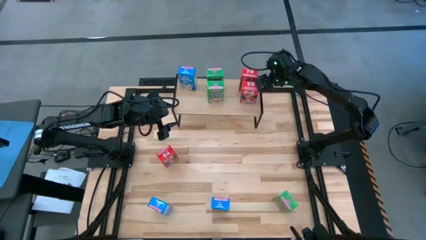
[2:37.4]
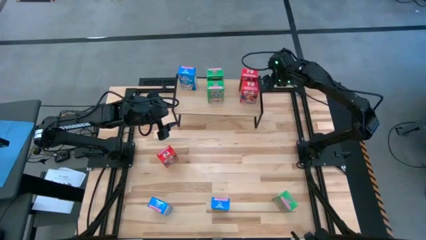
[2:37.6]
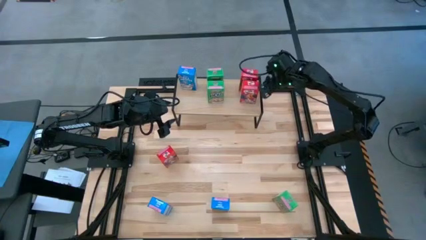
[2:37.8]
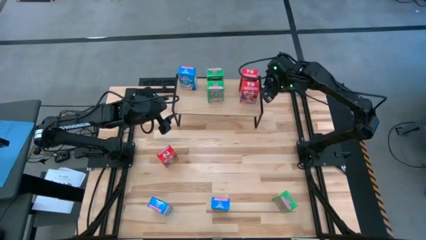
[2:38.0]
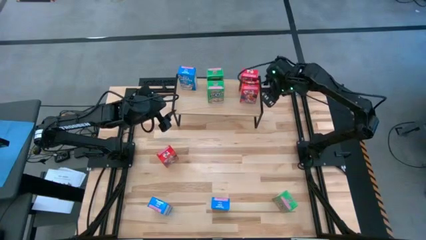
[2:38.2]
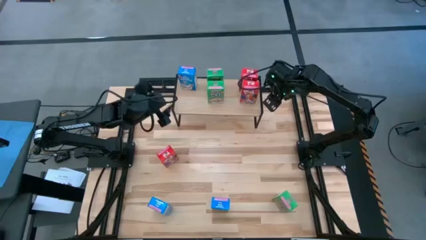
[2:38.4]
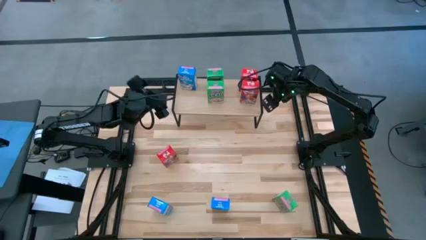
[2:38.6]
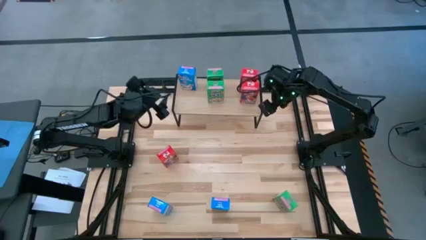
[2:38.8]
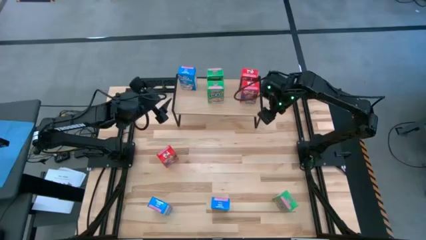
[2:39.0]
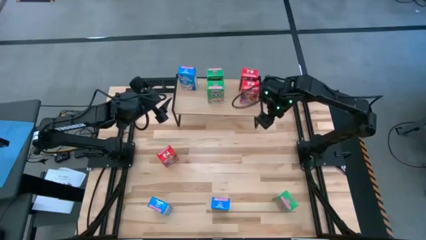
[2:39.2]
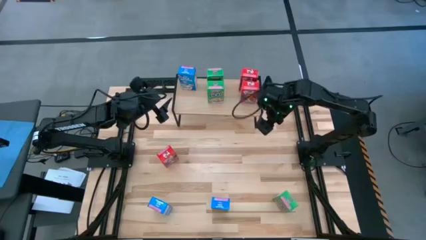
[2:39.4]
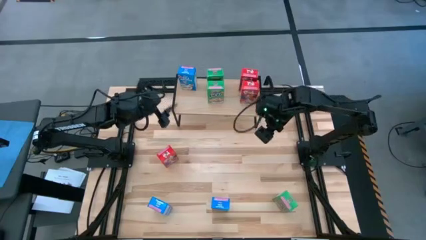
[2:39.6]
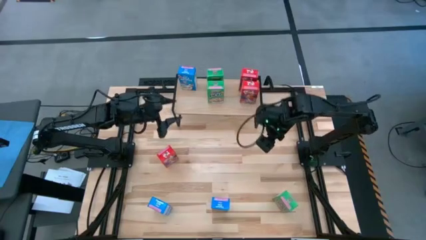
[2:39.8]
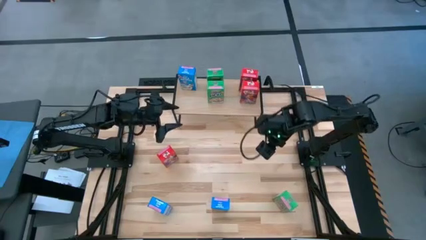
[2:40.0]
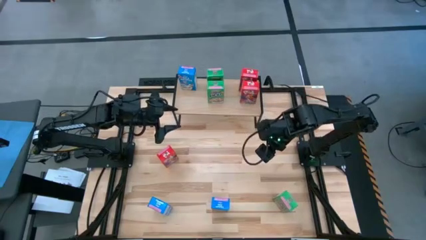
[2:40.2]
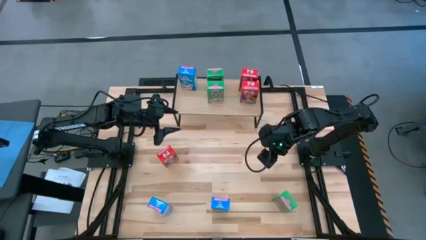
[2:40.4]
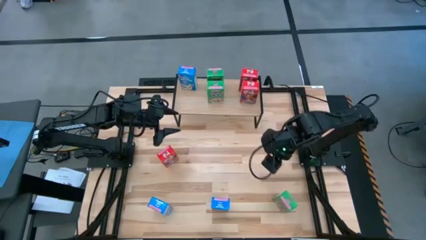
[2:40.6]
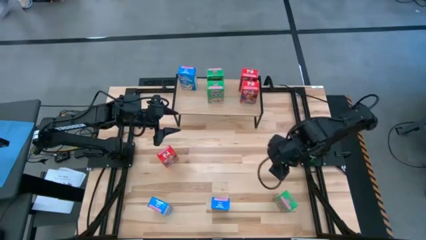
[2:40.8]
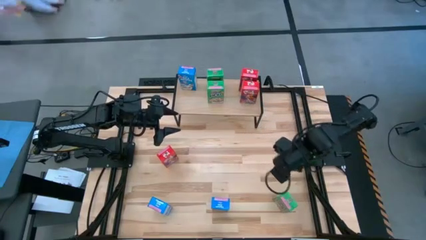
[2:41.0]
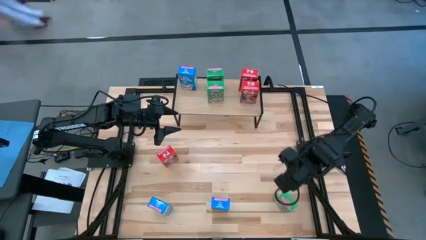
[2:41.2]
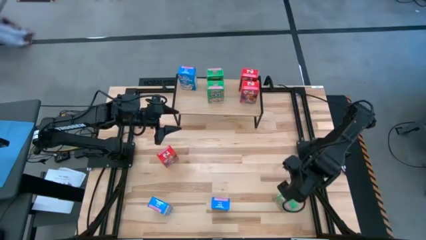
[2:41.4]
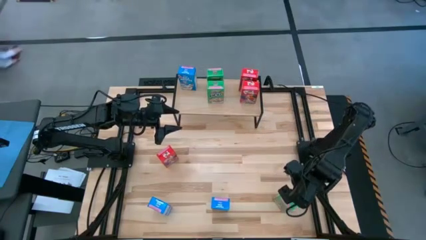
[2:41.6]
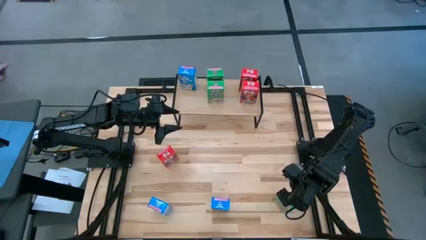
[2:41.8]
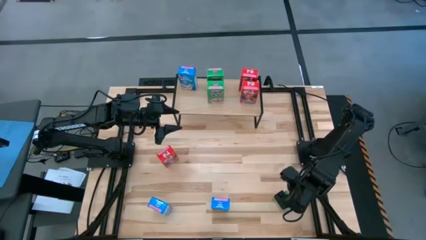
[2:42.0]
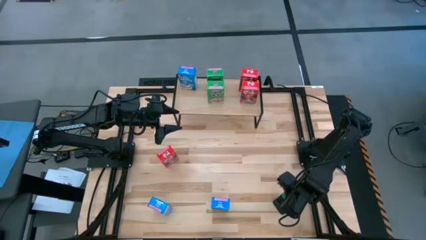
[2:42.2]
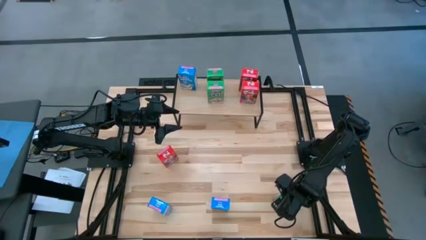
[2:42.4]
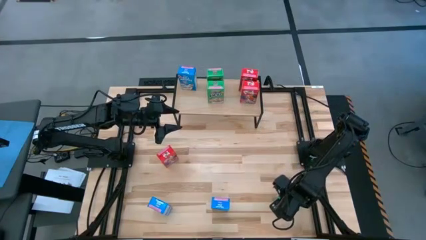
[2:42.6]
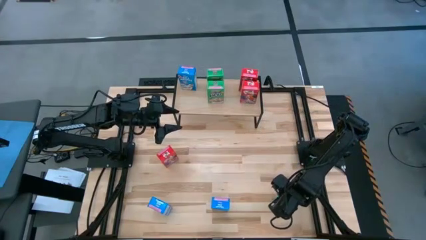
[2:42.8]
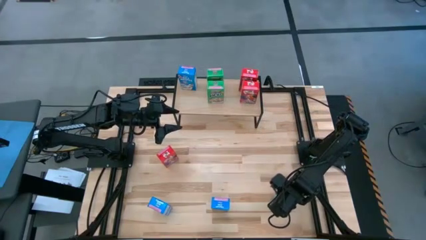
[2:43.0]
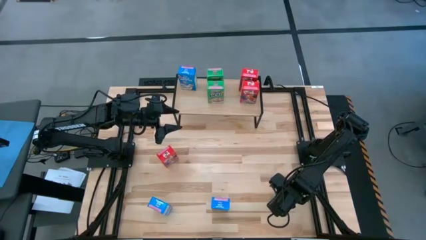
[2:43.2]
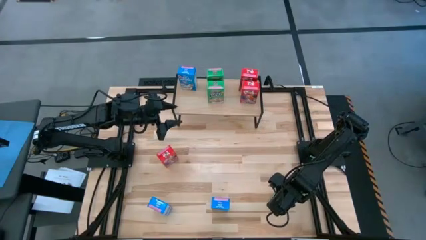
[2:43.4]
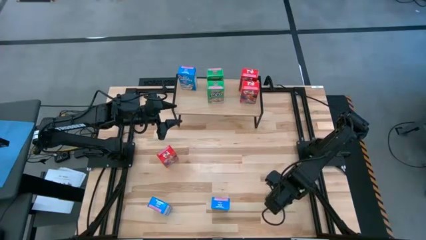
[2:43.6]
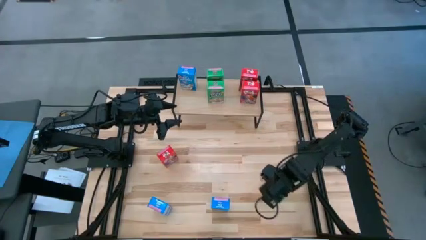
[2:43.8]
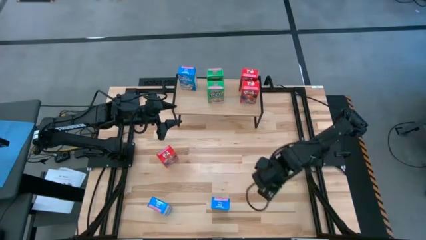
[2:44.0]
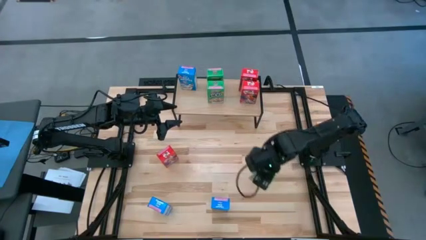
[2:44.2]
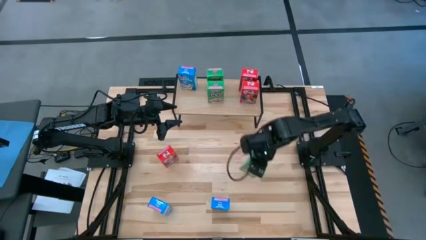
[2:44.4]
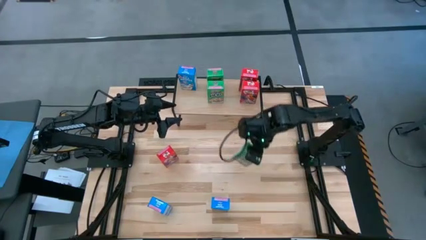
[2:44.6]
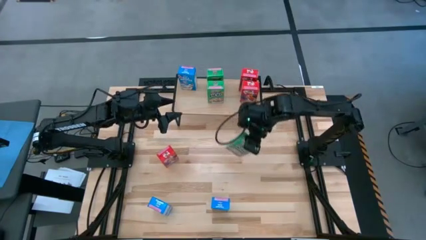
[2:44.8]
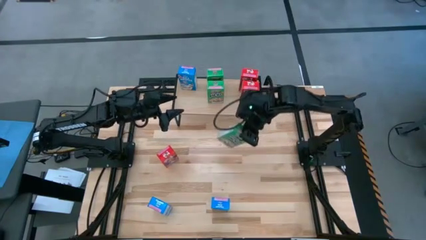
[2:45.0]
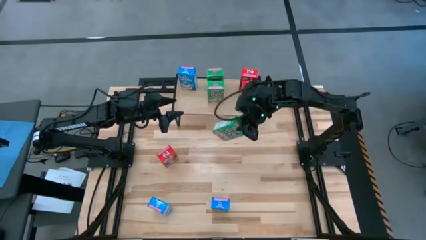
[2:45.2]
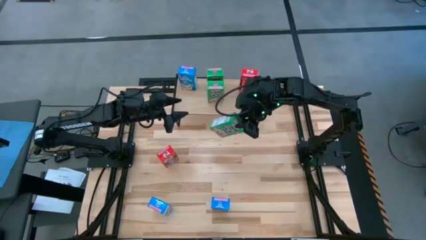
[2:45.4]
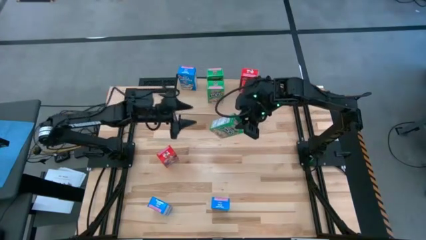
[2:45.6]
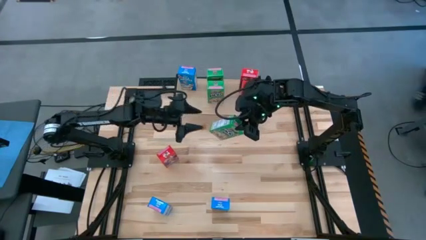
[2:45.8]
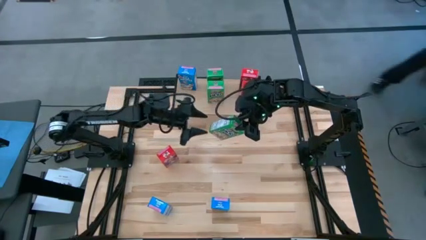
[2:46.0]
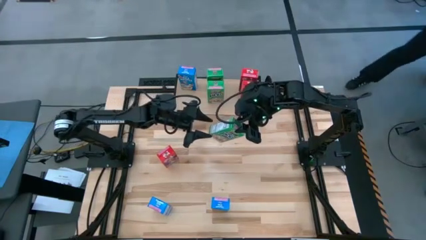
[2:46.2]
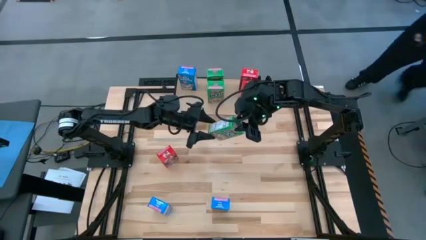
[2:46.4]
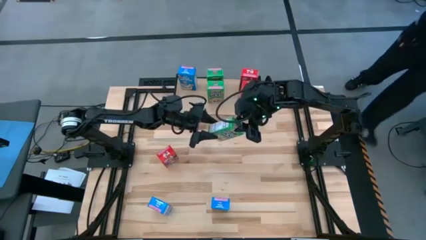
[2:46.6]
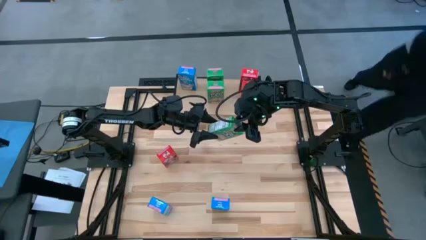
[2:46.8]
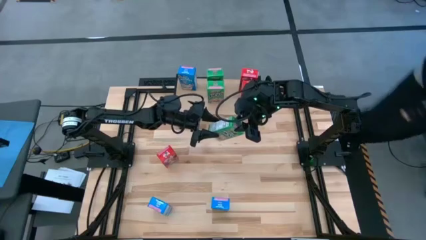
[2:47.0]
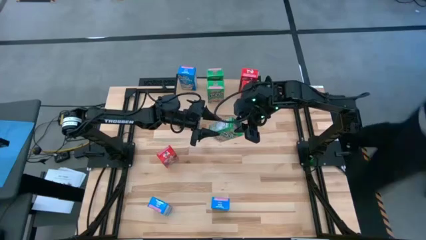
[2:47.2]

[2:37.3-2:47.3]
Task: Stack cereal on shelf
Put the green cereal box on the shelf aligned with the green cereal boxes

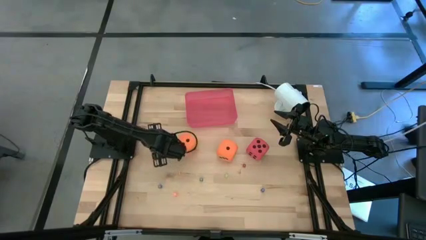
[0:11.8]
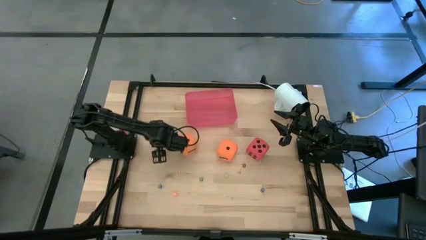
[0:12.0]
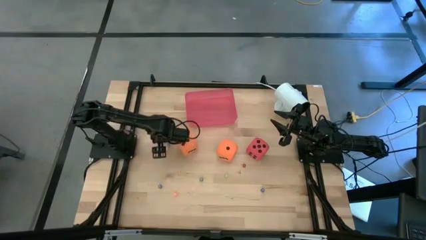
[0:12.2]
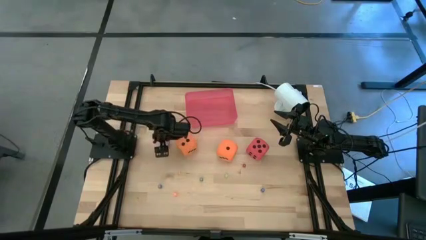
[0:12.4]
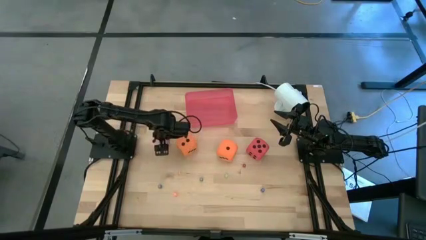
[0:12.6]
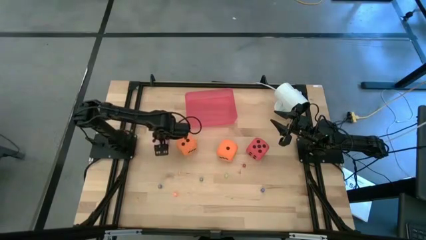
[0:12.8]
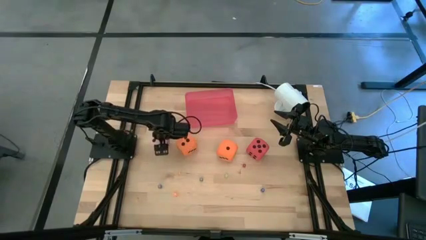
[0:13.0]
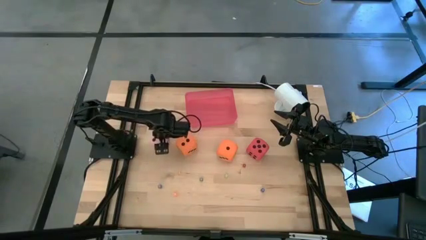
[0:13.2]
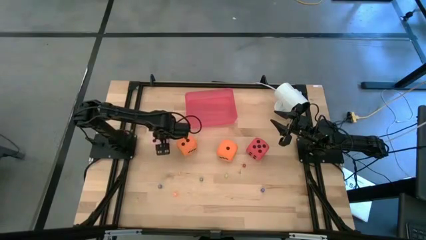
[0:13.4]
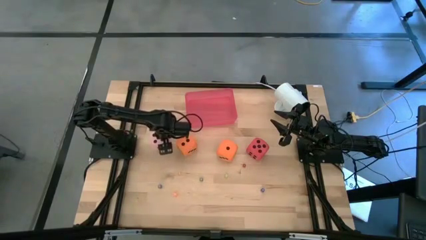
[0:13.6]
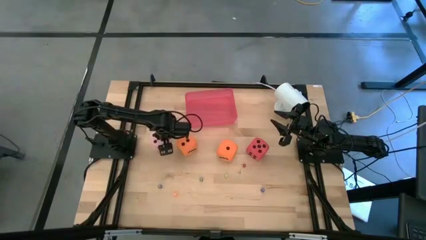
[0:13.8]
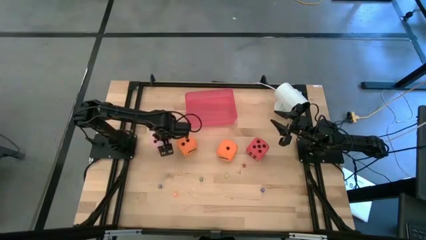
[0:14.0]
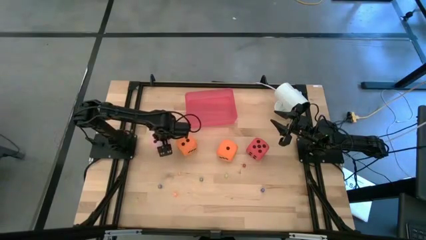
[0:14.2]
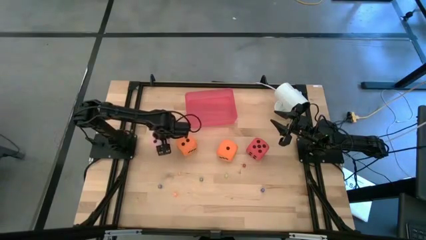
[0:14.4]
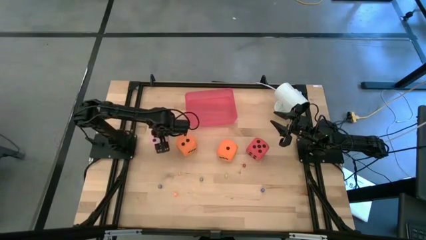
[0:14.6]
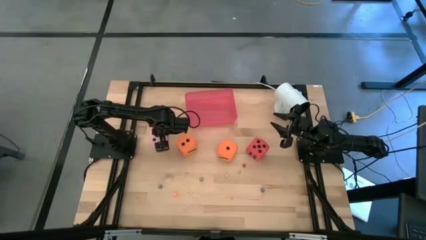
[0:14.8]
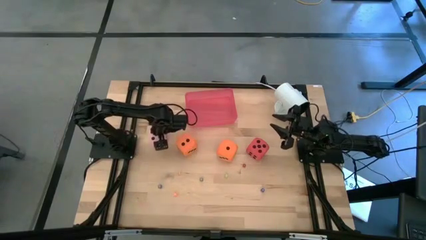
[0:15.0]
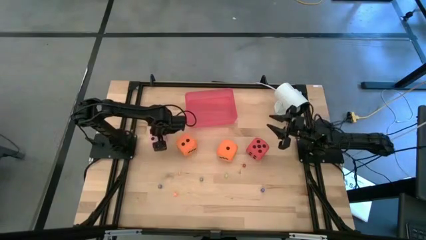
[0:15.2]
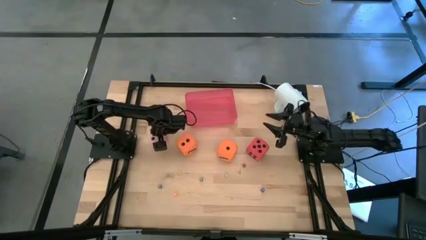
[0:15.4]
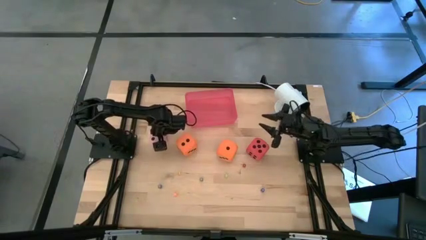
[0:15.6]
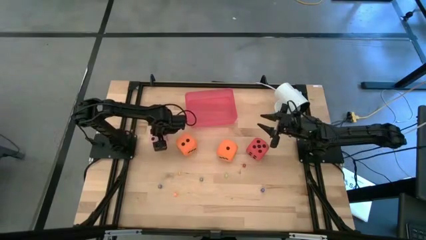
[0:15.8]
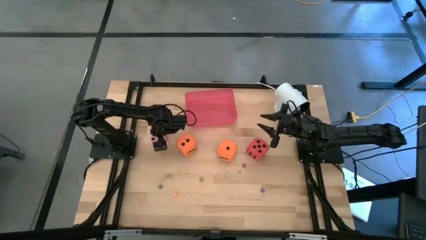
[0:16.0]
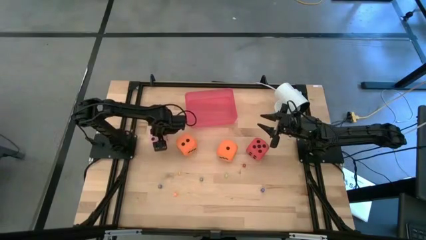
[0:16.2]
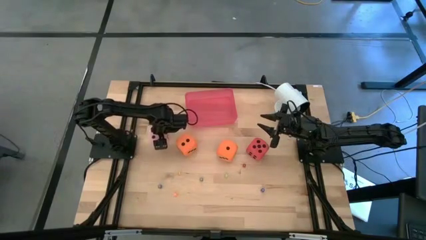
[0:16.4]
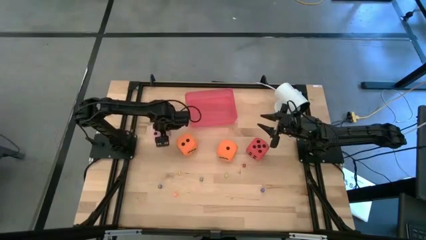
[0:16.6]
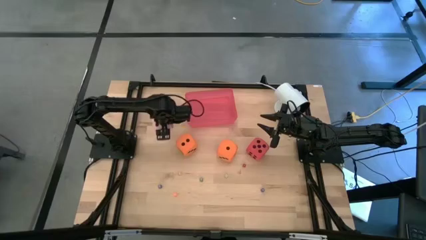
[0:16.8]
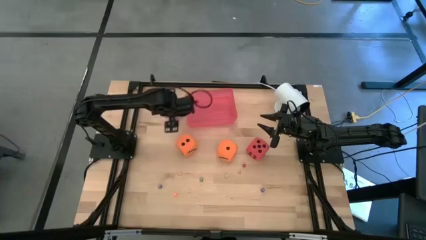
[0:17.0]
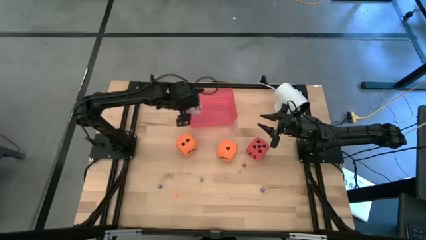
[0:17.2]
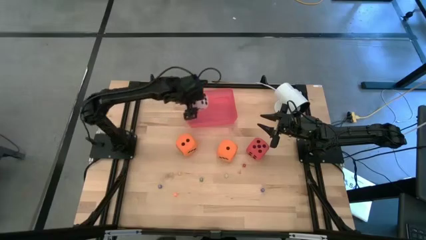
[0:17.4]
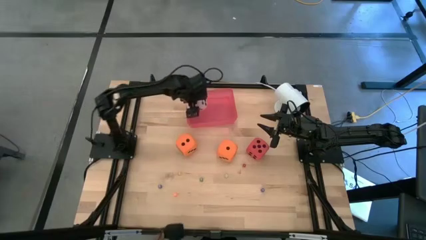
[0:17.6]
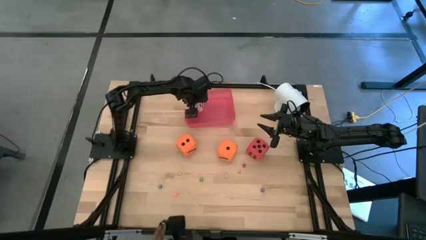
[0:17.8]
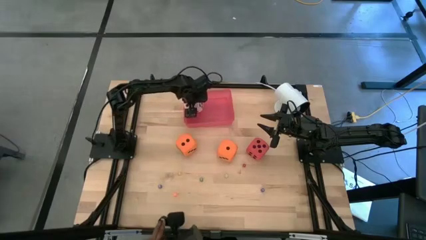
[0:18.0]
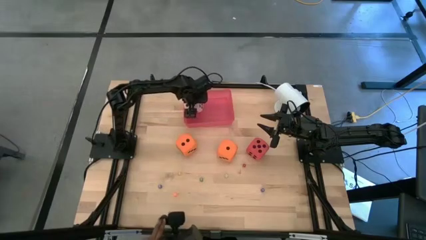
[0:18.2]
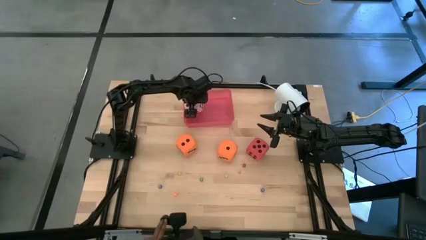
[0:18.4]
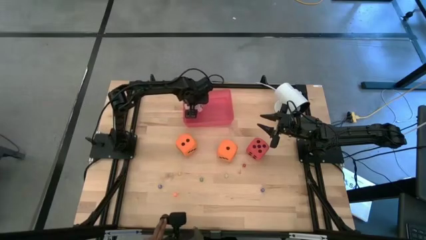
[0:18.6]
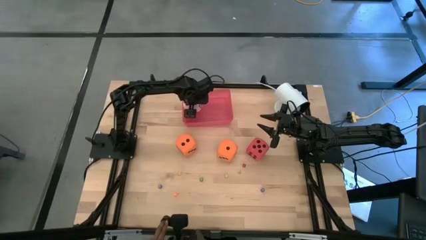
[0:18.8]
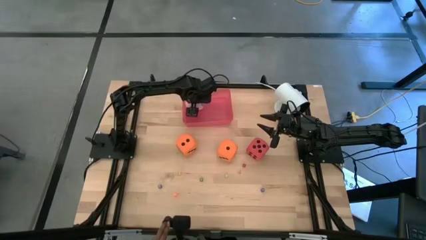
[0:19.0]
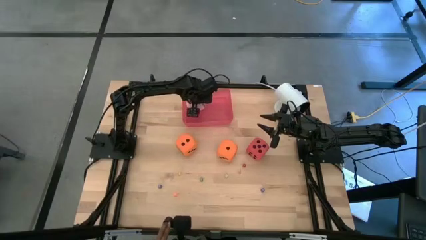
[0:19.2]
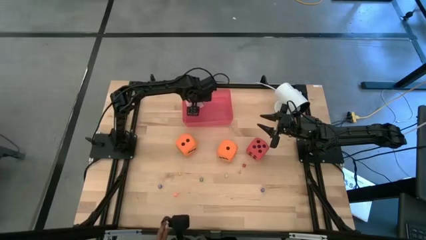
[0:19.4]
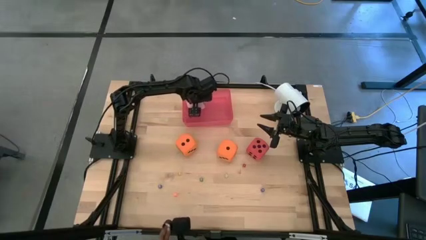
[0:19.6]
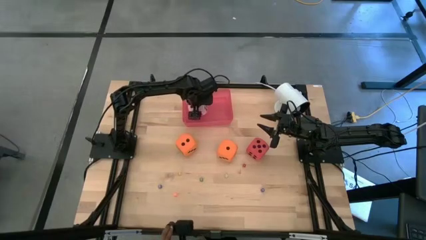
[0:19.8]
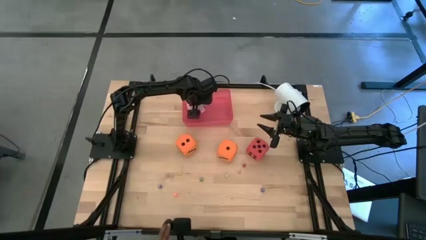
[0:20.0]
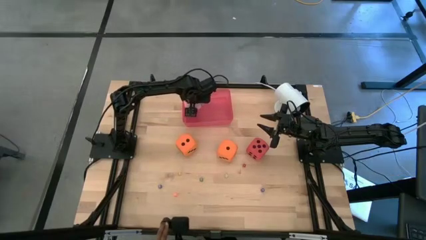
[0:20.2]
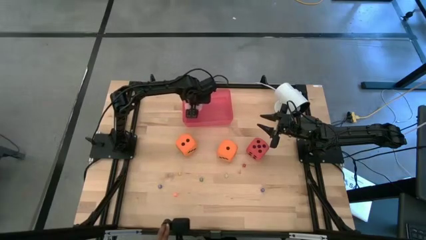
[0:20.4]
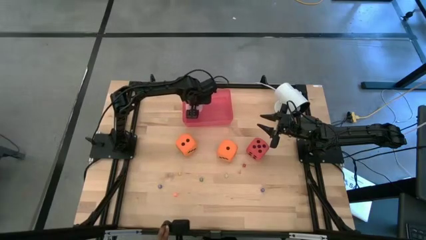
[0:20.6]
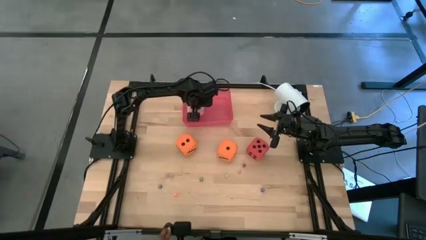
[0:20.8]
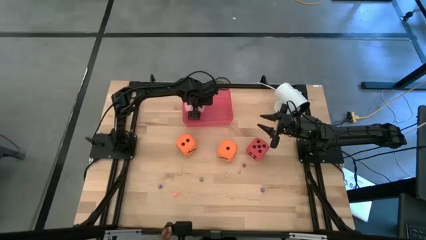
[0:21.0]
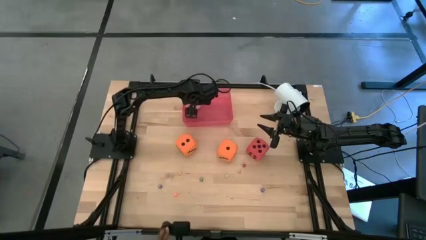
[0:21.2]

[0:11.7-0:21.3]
Task: Pick & Place Dice
Put the large pink die into the red bin
